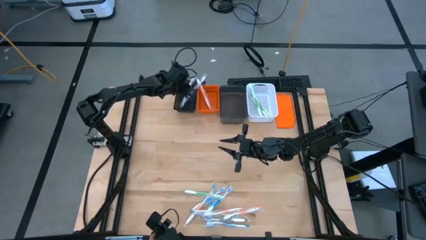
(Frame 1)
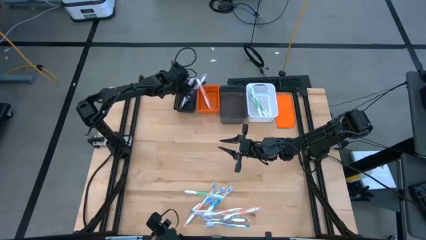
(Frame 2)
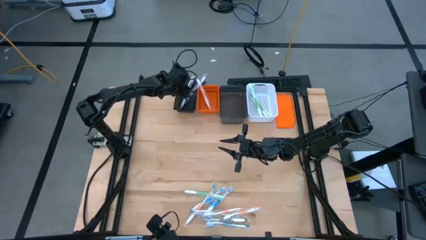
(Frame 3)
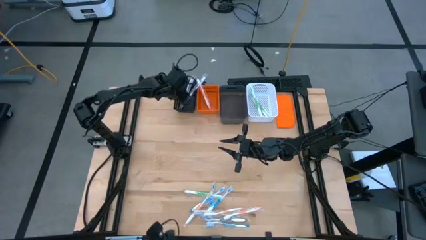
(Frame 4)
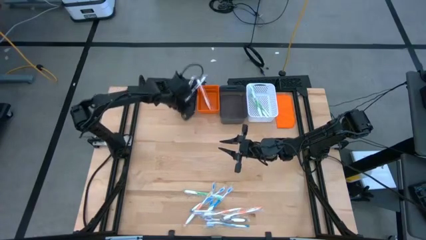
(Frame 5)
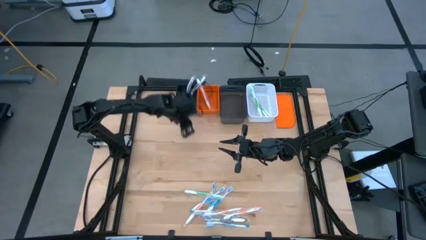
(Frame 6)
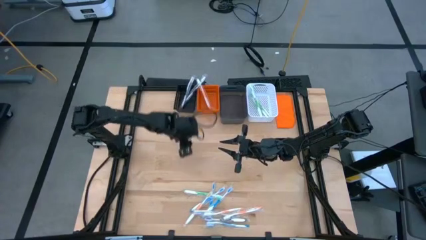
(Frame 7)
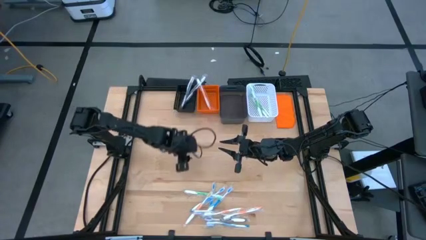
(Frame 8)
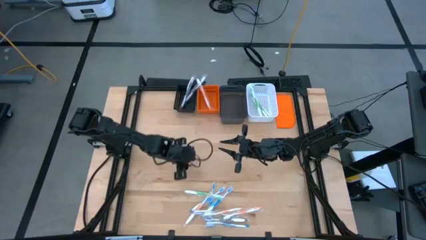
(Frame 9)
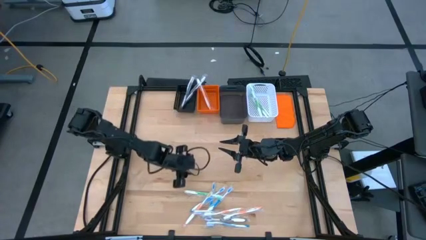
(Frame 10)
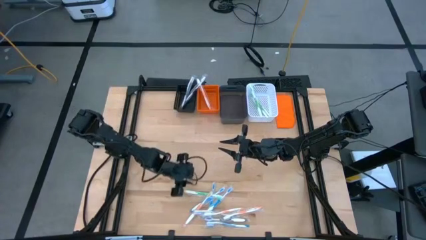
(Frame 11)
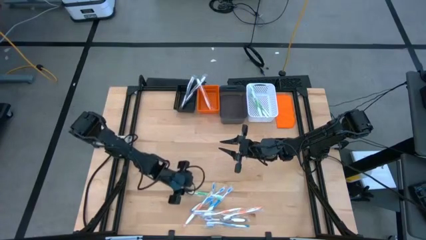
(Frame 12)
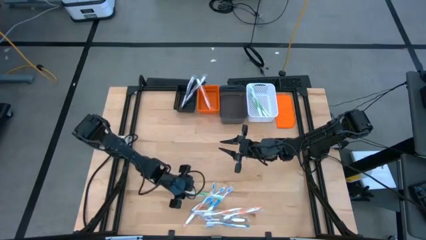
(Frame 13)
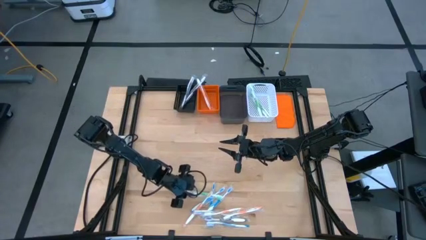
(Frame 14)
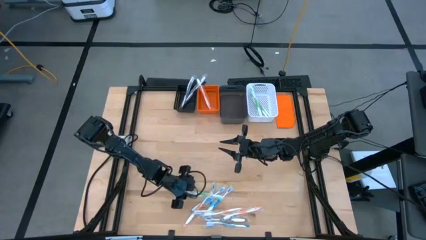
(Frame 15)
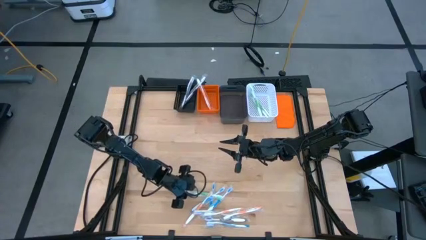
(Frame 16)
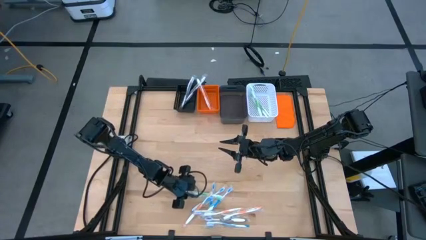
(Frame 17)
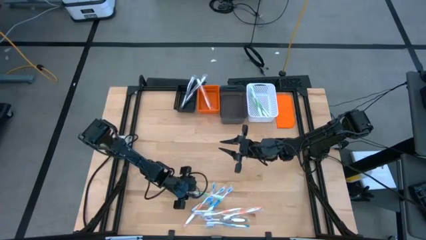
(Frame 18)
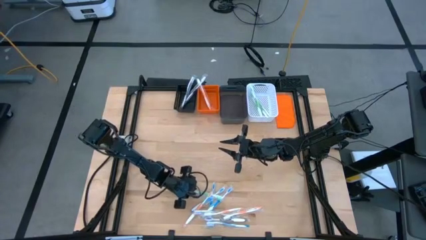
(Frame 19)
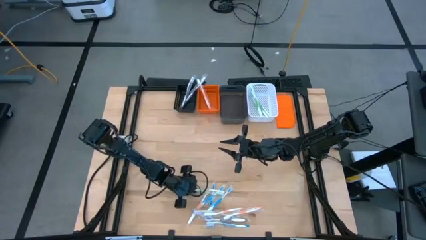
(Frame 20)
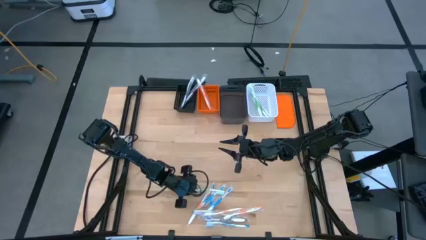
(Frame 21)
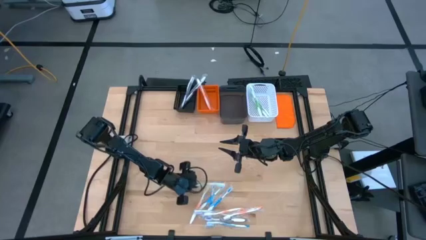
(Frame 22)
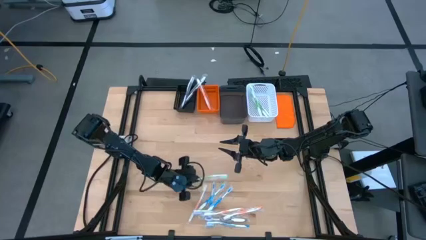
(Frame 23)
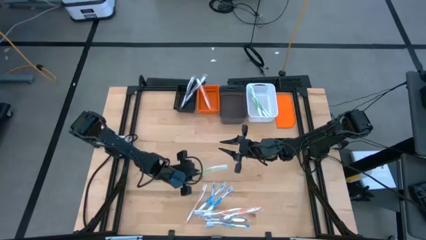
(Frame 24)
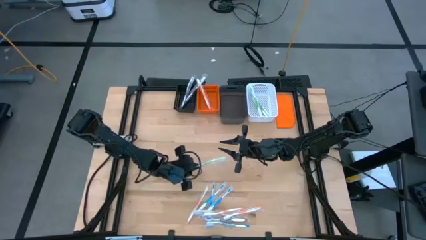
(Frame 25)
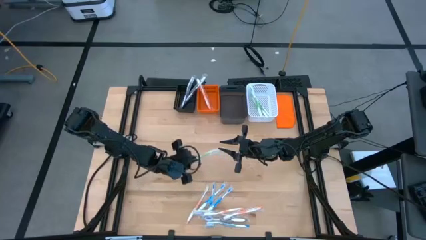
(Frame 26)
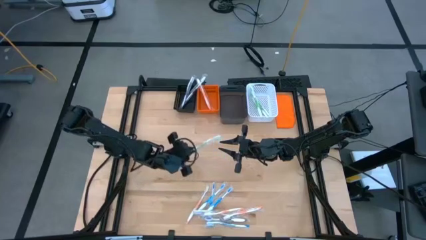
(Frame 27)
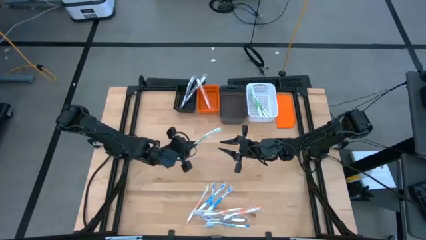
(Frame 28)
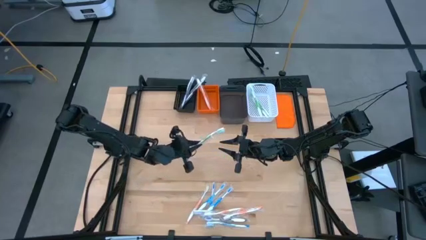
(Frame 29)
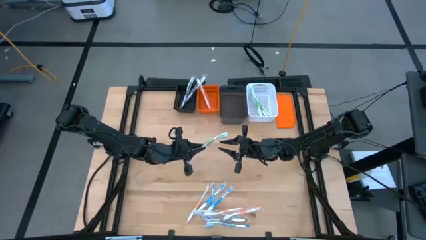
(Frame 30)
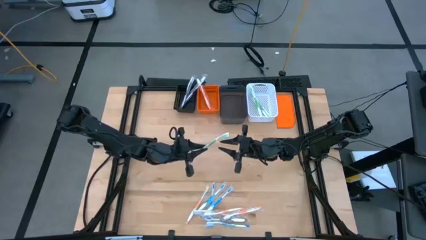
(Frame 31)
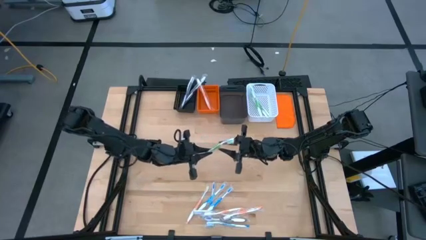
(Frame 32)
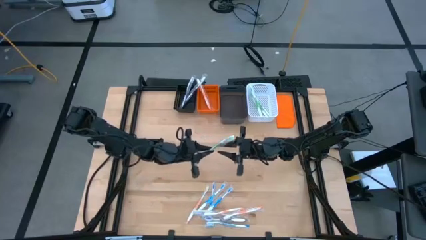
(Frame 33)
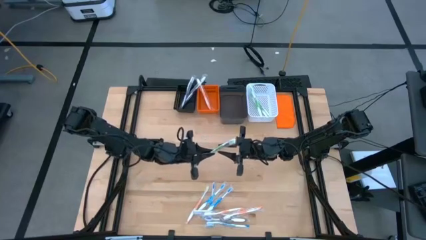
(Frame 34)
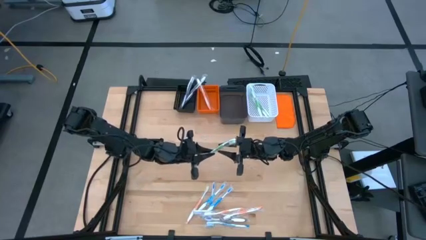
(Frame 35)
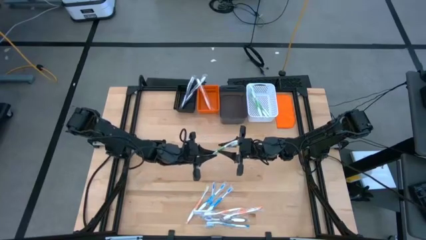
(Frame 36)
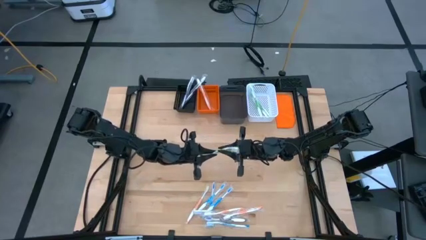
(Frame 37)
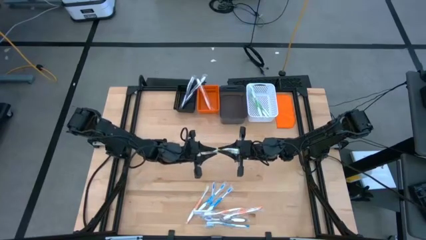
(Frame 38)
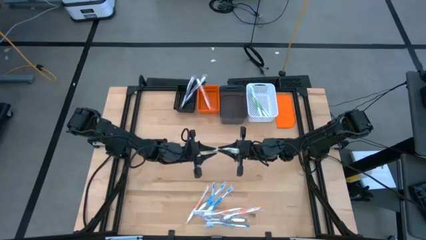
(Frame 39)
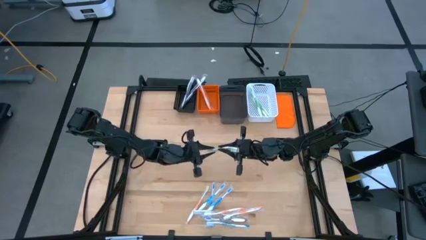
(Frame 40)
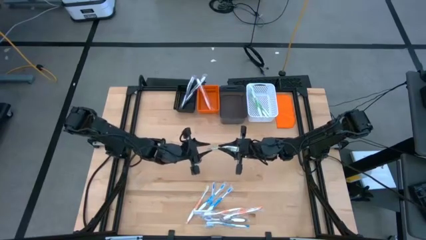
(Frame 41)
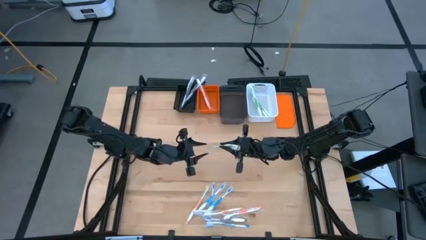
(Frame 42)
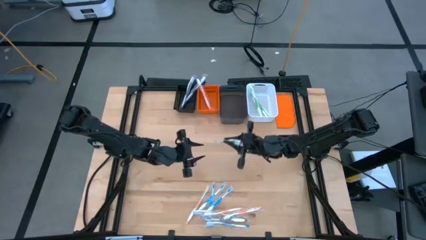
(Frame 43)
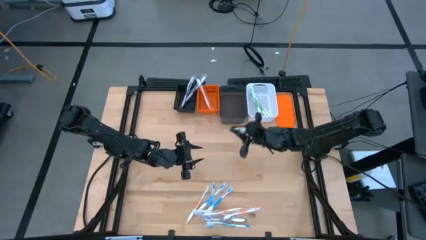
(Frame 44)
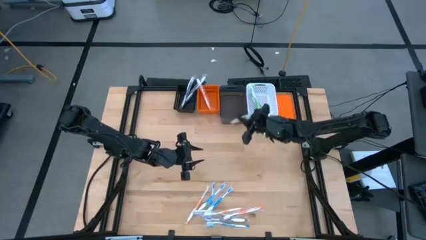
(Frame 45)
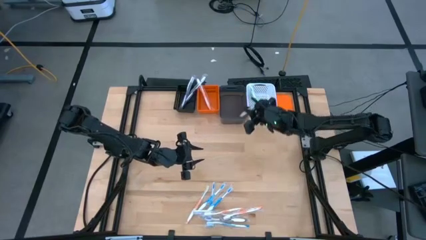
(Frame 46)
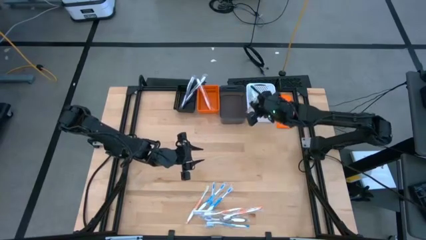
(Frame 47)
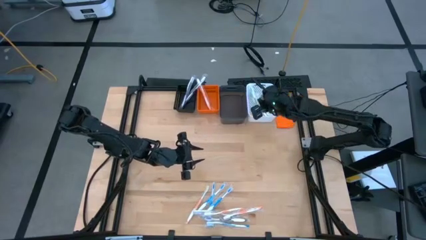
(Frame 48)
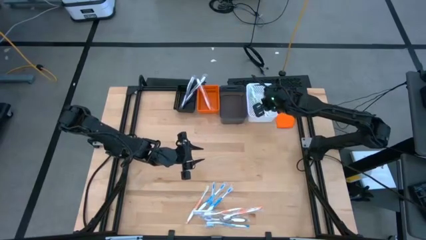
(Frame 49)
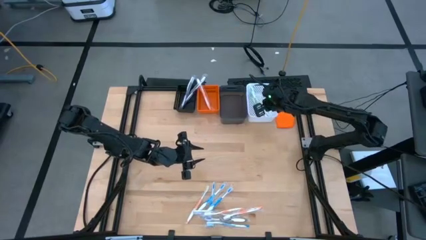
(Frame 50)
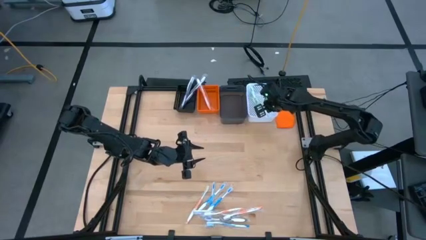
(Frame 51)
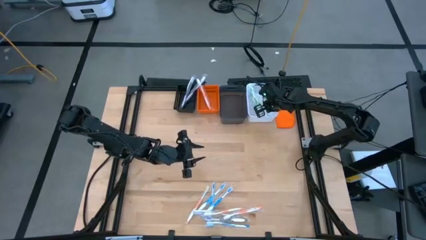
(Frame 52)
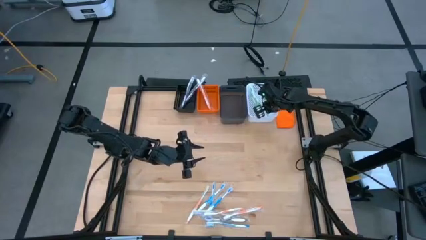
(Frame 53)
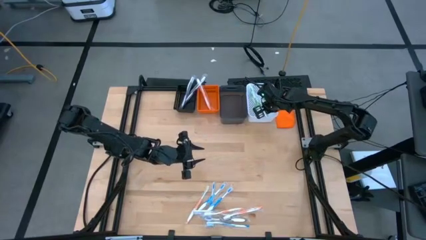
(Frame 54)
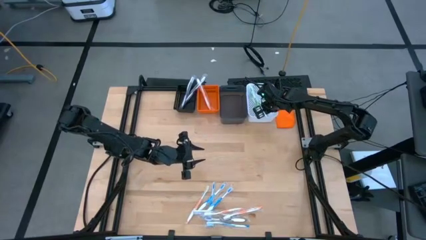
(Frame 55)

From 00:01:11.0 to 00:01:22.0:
Task: Pick & Place Toothbrushes
Put the green toothbrush into the white bin

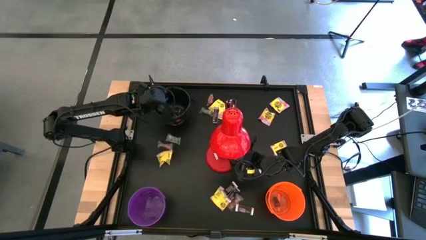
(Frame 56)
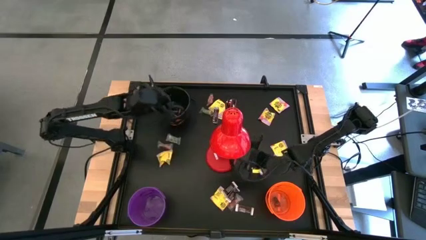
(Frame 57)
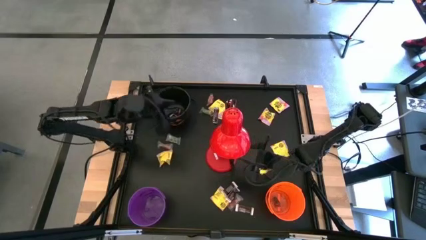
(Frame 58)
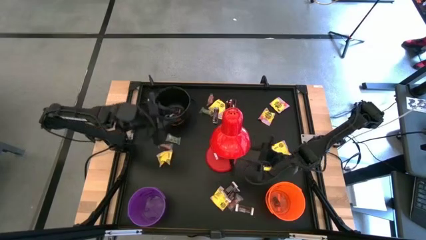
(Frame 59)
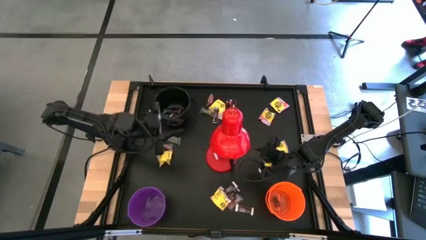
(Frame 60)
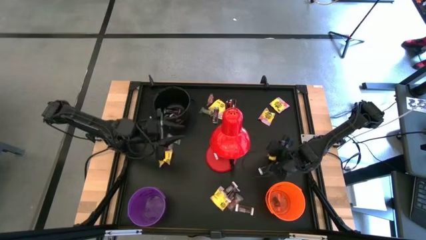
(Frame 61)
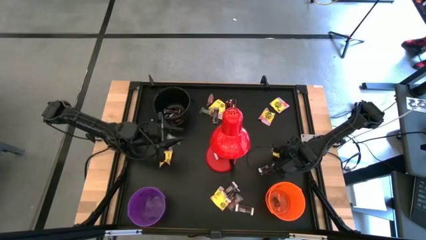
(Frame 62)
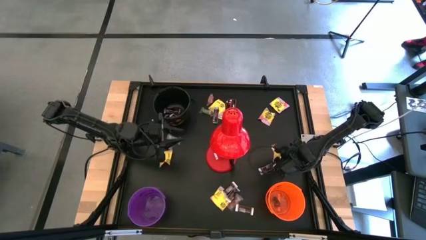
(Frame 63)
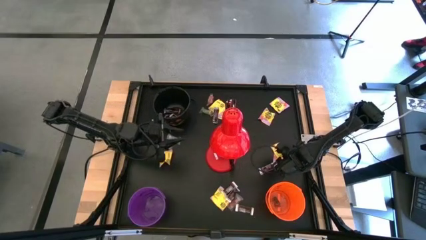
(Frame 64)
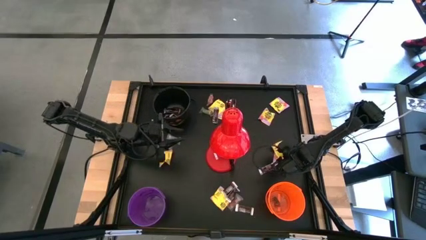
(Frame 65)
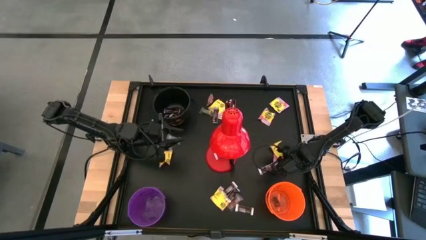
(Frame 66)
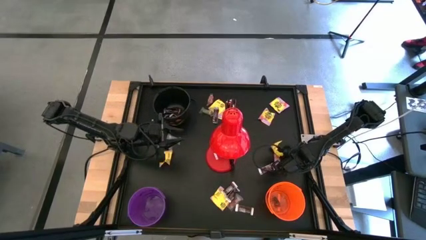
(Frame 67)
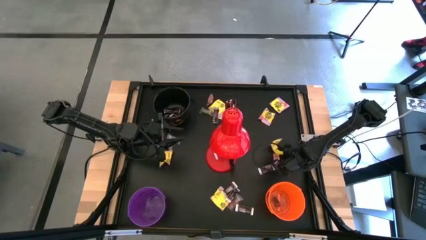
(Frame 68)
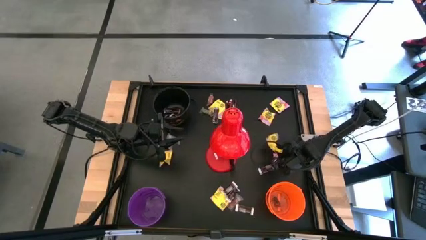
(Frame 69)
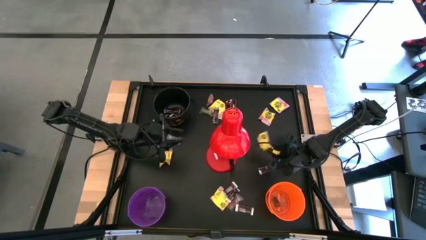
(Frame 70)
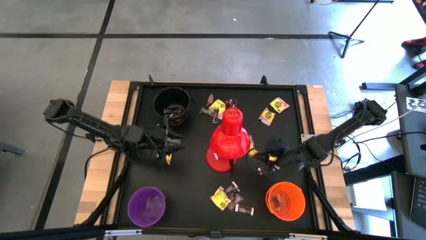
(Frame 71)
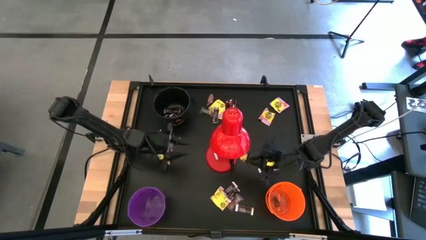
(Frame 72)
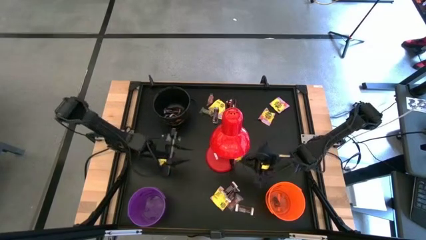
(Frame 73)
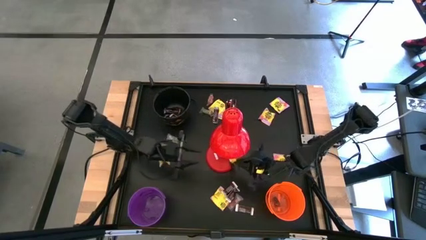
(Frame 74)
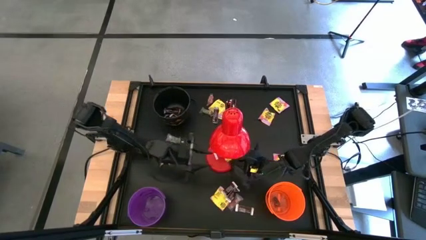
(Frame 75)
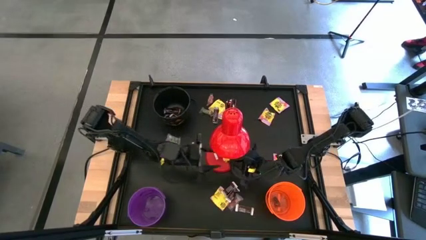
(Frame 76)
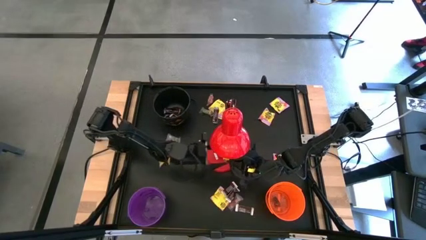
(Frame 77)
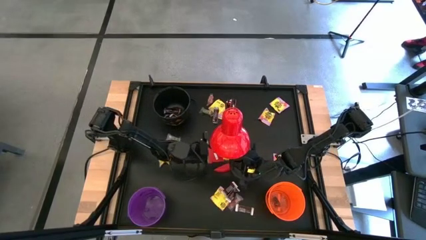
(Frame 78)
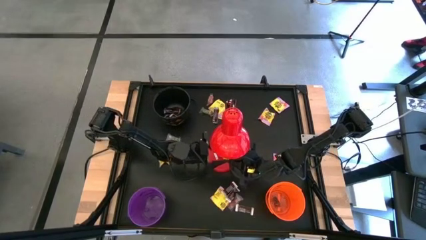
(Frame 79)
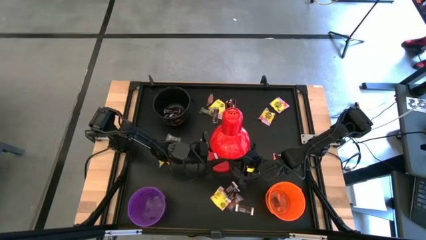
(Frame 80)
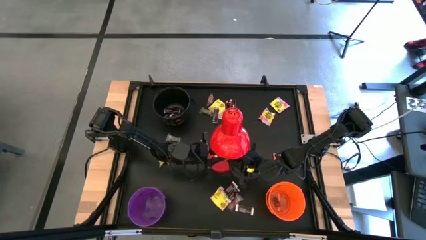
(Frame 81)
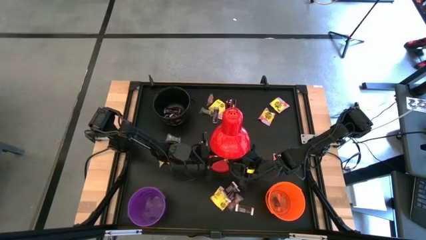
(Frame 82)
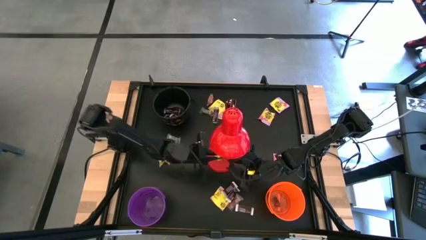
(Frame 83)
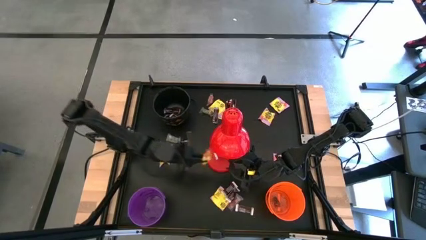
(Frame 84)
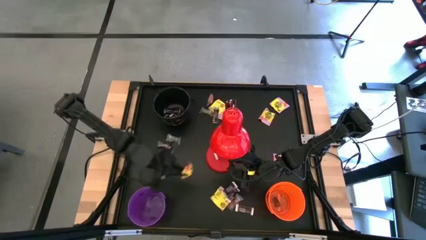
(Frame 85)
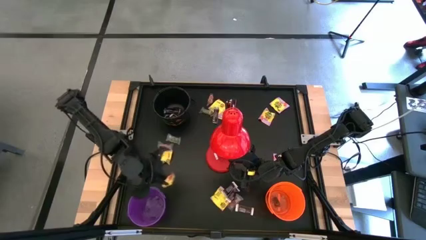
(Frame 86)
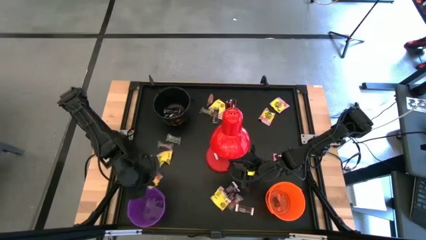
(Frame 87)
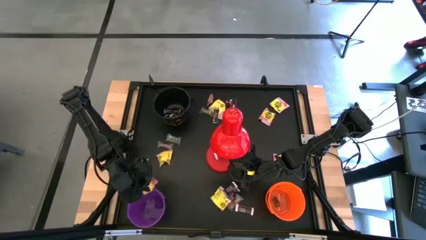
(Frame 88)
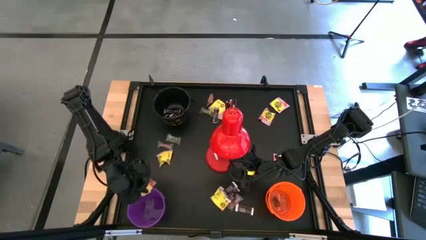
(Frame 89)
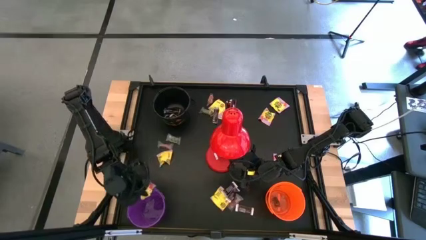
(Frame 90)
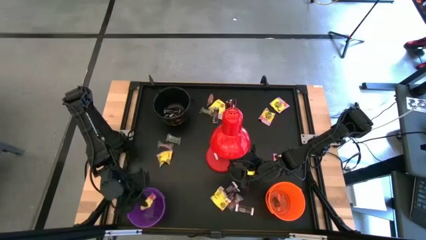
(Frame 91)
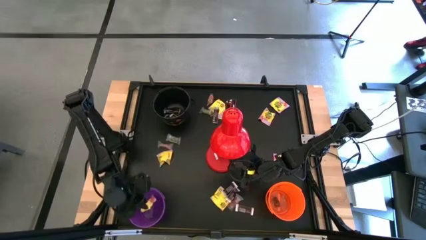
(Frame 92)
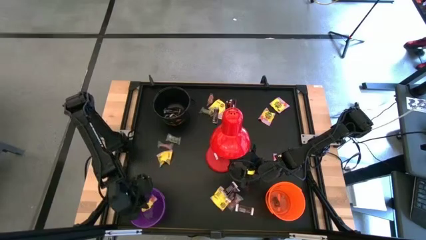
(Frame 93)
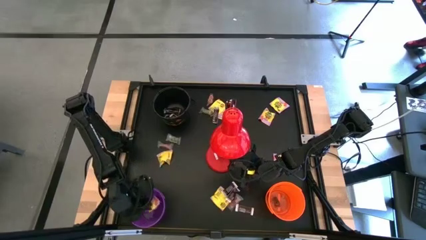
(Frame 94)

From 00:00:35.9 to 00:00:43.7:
Task: Organize candy in baskets
Put the yellow candy into the violet bucket
